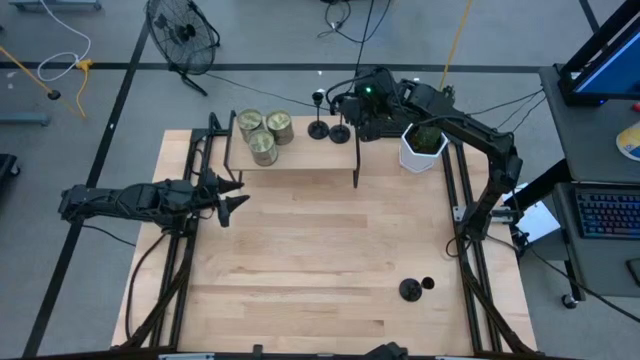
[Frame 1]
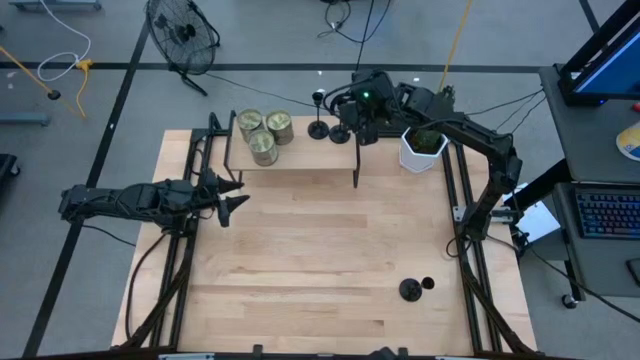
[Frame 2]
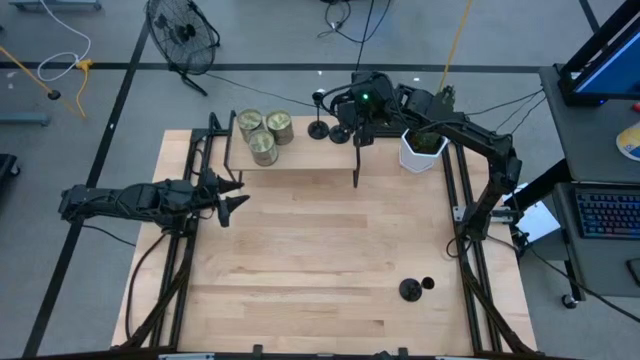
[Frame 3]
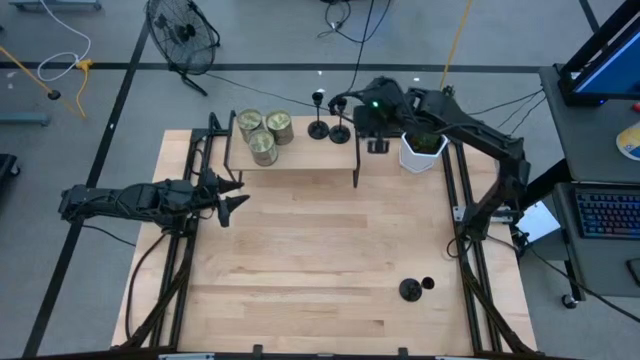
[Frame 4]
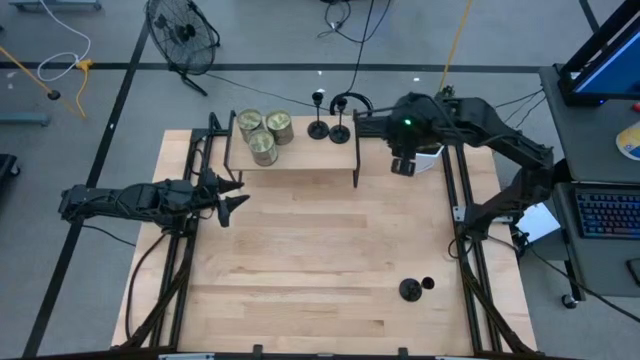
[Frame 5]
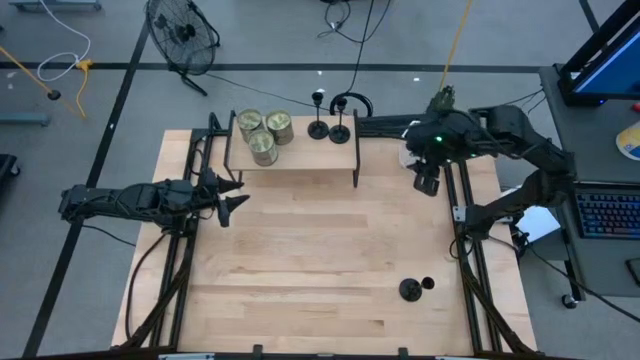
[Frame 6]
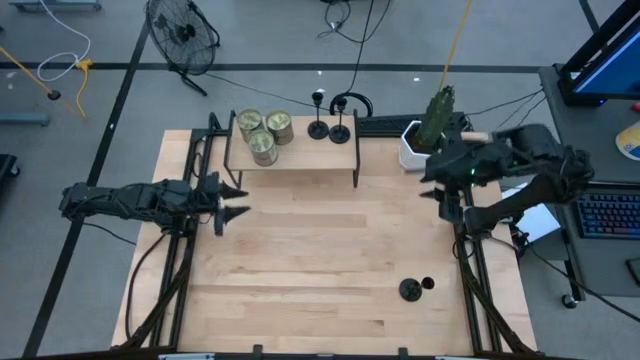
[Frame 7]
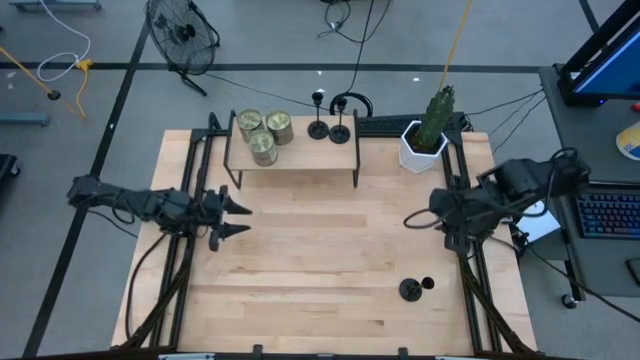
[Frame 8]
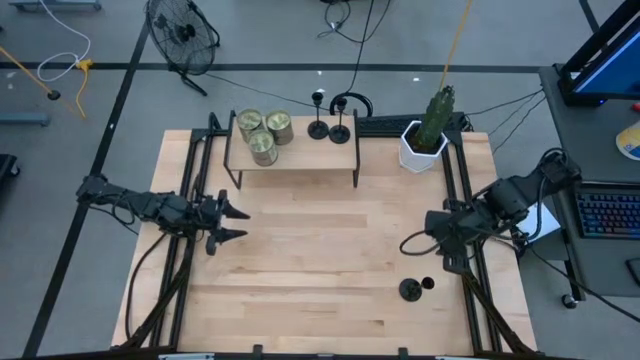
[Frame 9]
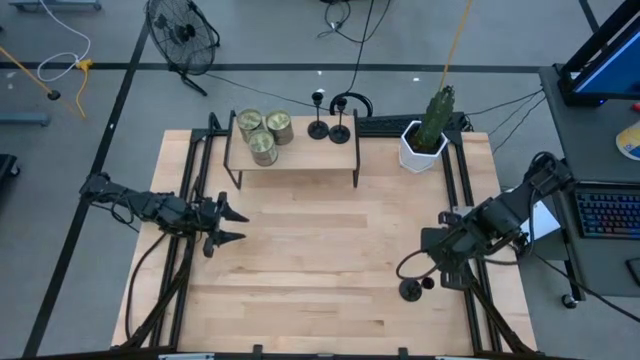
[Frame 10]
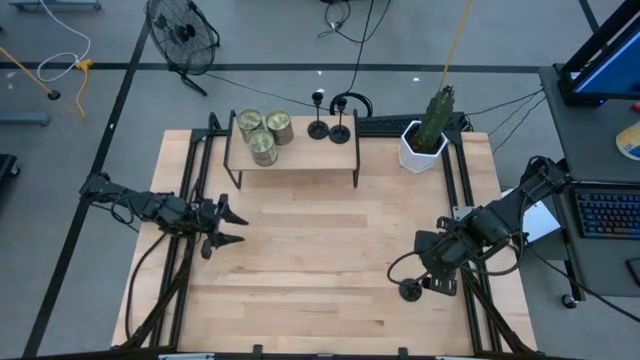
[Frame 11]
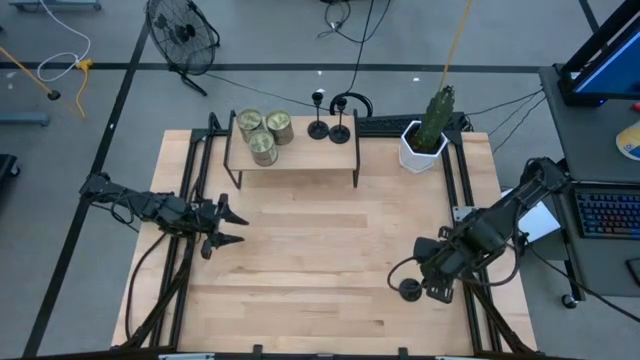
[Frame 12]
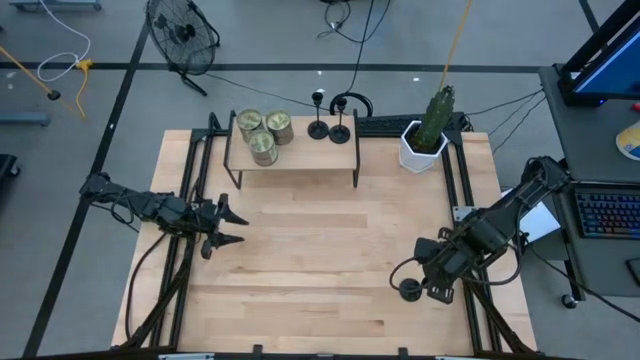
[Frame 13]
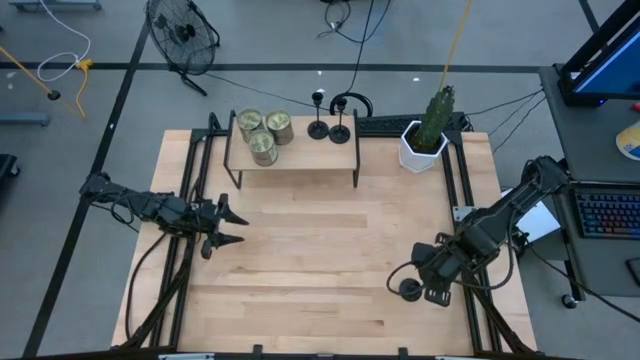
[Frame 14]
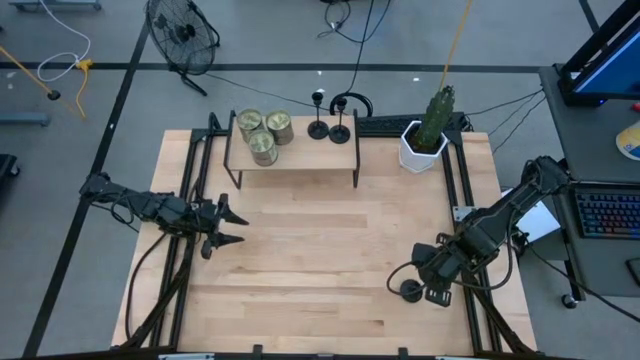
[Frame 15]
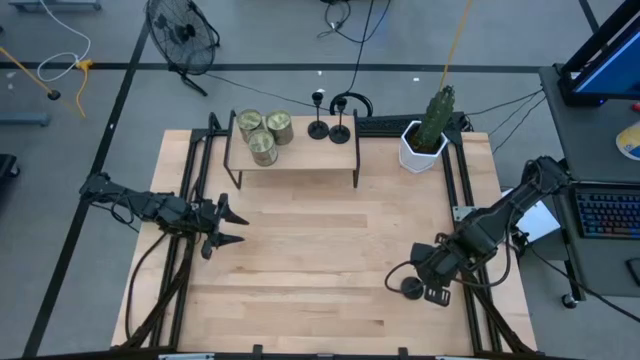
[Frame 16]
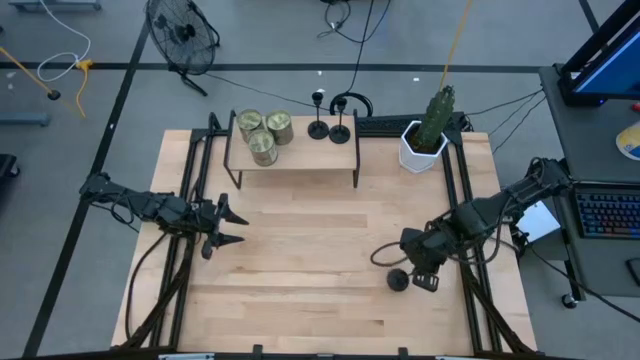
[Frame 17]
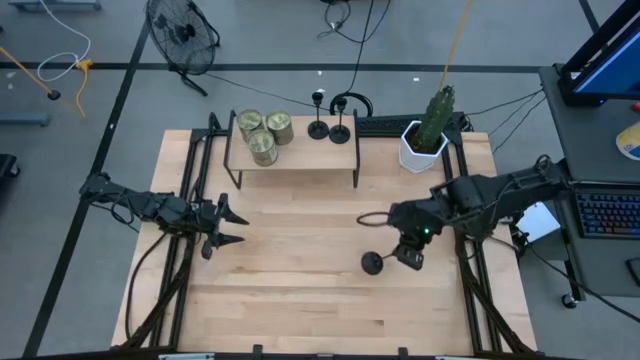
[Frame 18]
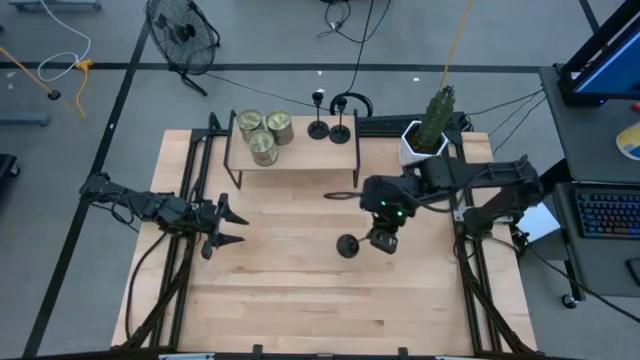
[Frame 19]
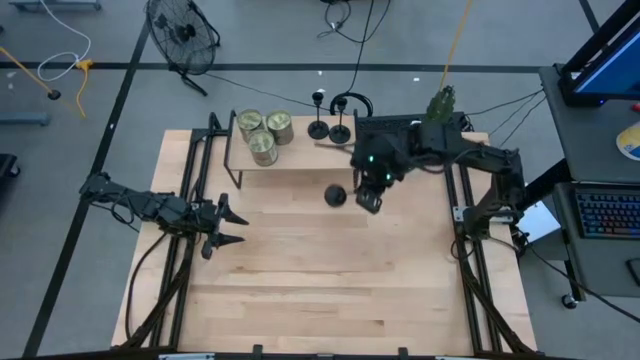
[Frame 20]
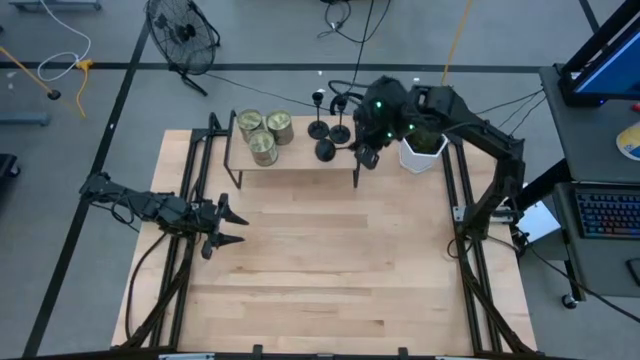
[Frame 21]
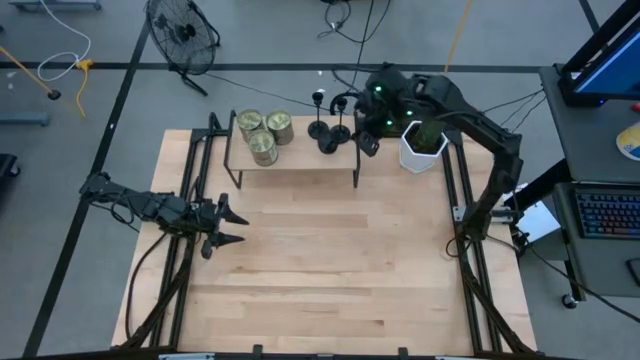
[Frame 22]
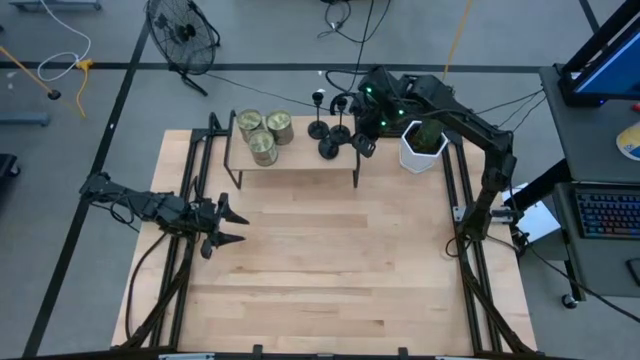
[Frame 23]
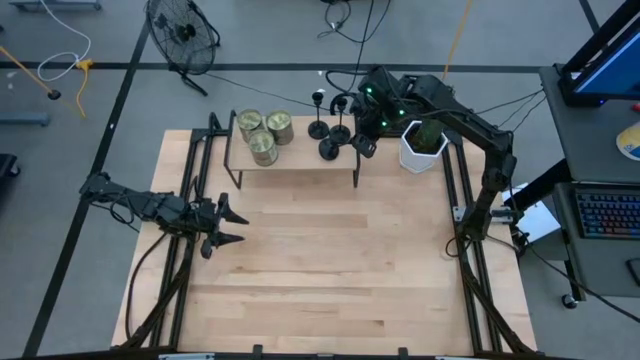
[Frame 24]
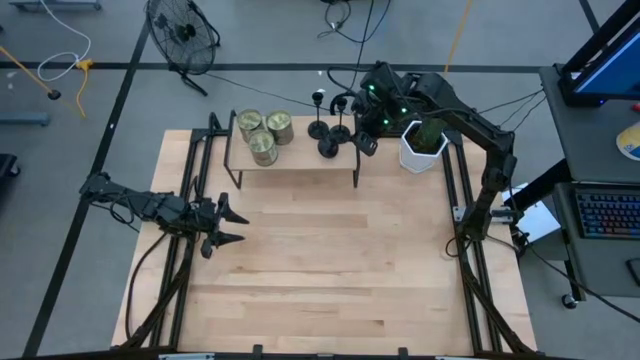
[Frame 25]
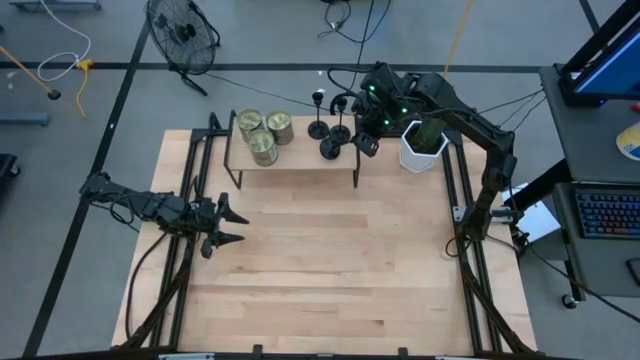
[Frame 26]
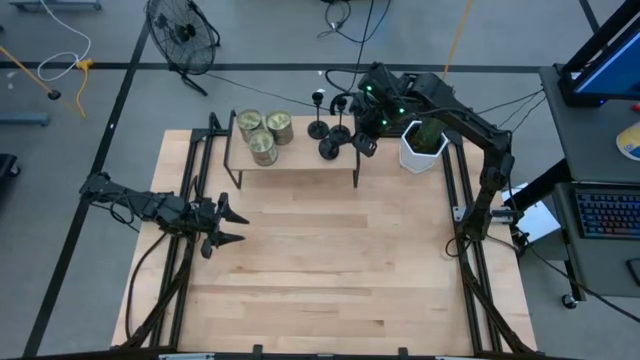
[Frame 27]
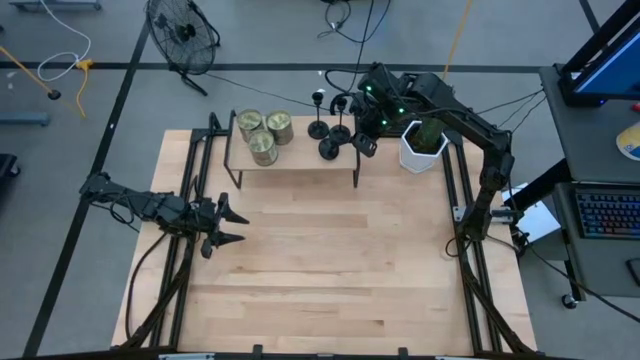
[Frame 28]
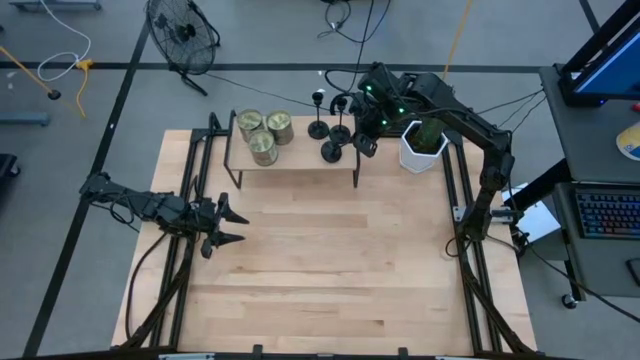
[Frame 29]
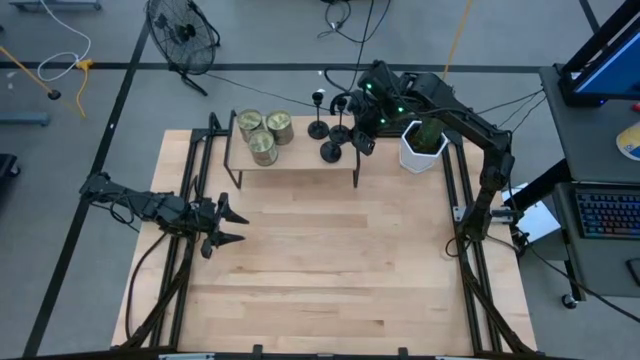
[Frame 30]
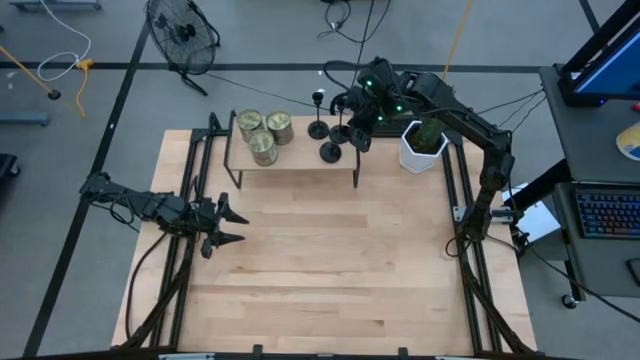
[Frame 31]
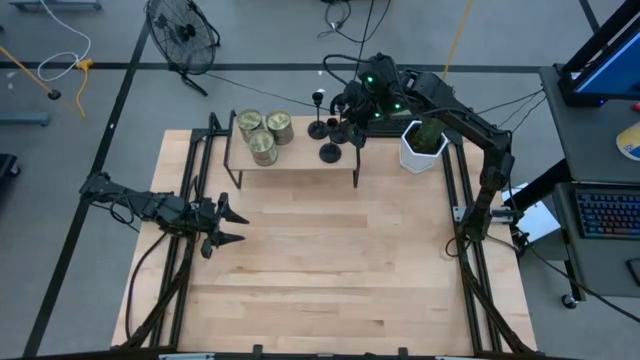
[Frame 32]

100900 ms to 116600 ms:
Task: Pick & Place candle stick holders
Put the black candle holder on the shelf

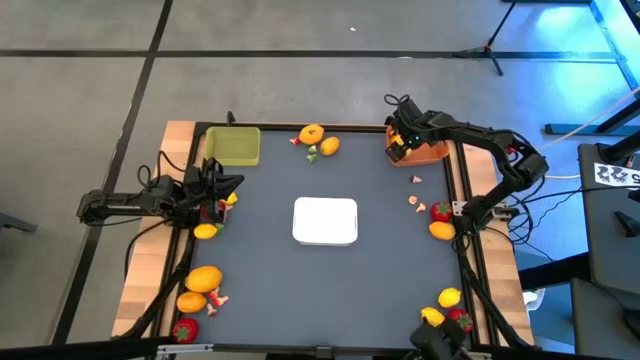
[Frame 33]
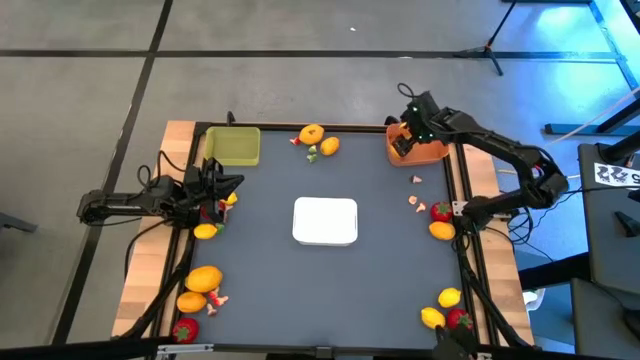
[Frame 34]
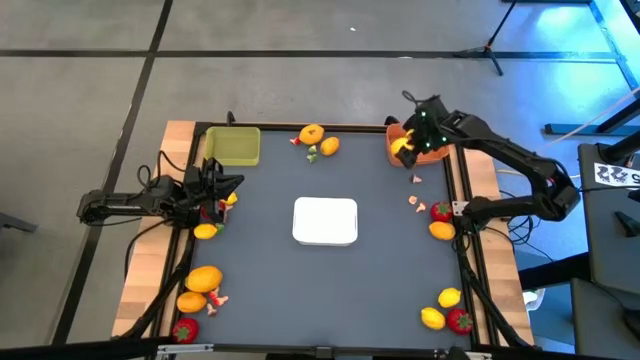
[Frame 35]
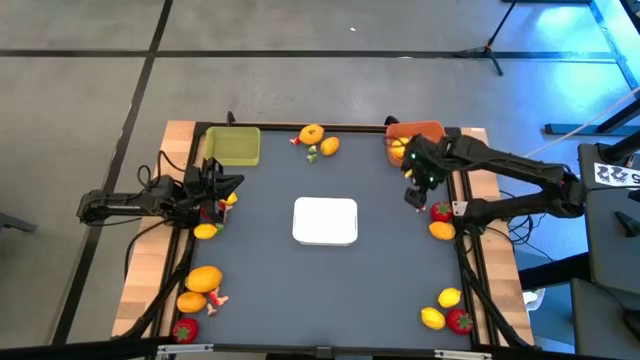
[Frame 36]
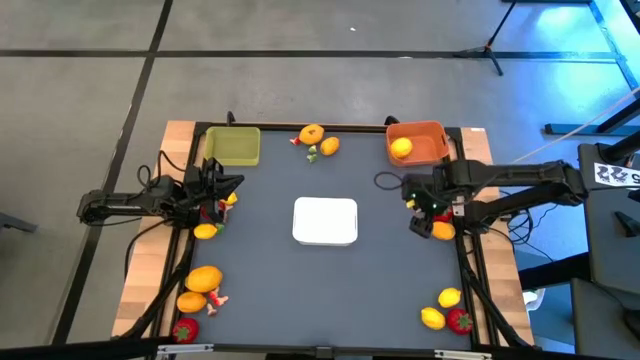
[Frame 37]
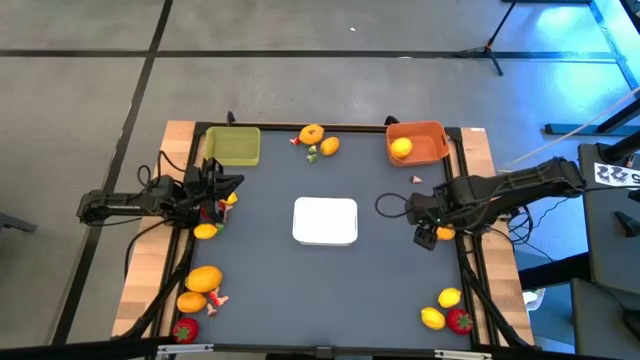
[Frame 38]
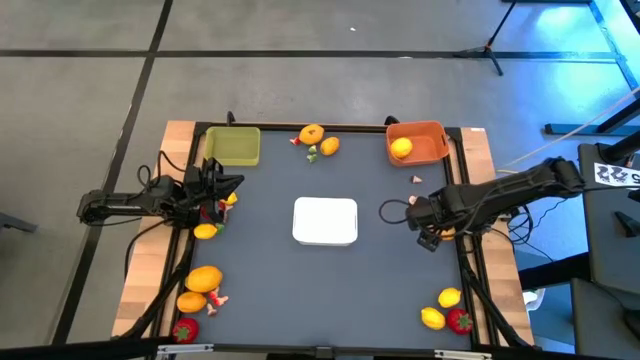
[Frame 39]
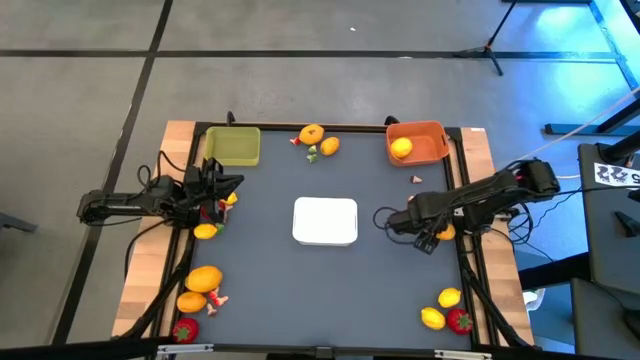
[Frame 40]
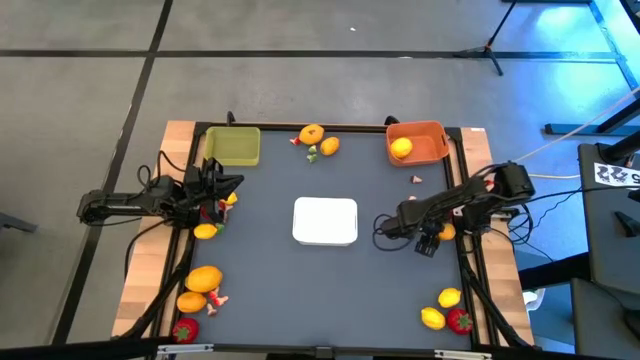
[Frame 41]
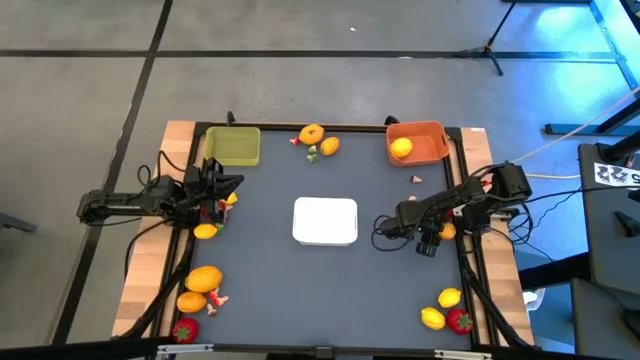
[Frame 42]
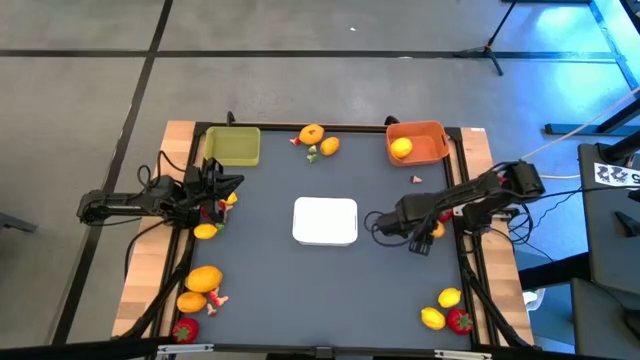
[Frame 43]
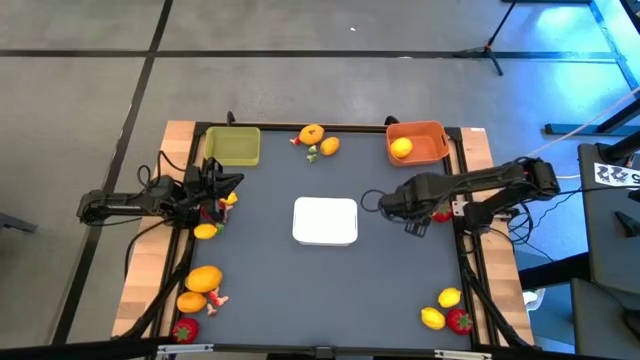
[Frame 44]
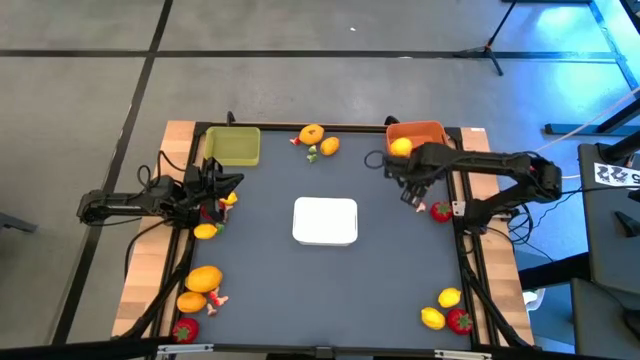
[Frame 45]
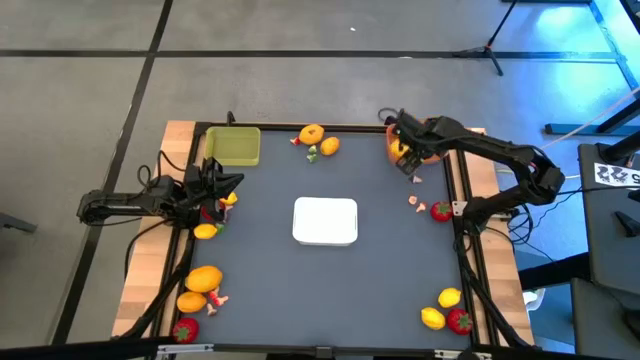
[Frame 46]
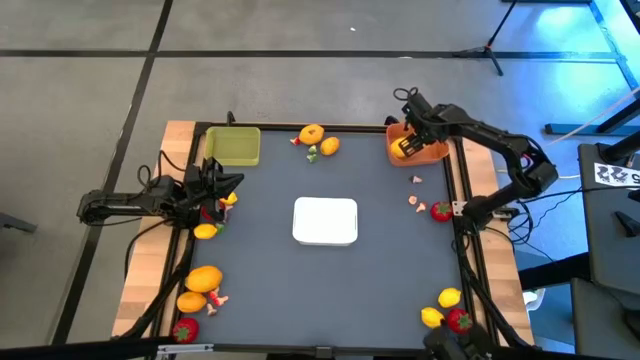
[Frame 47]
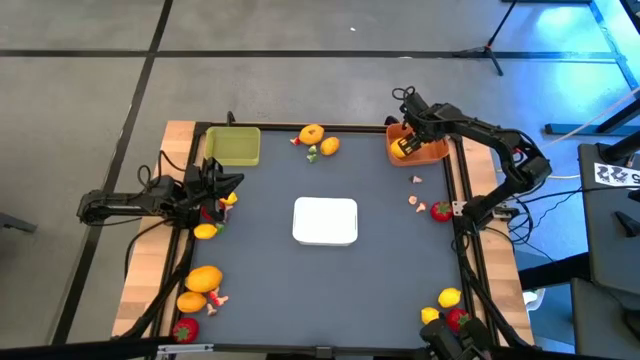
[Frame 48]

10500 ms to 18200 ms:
Task: Sort produce into baskets
Put the yellow lemon into the orange bin
